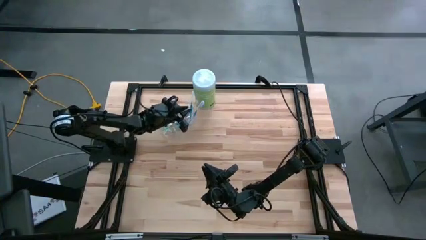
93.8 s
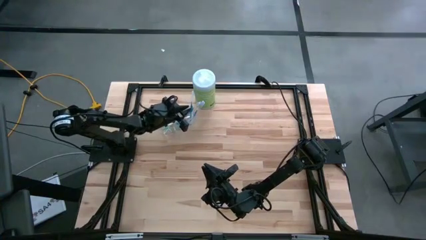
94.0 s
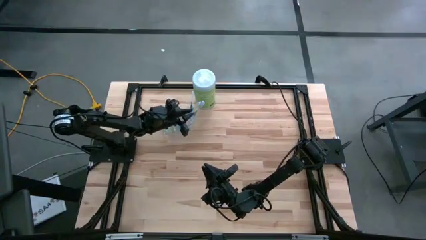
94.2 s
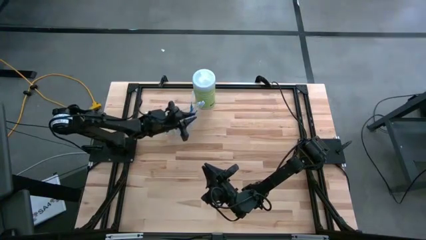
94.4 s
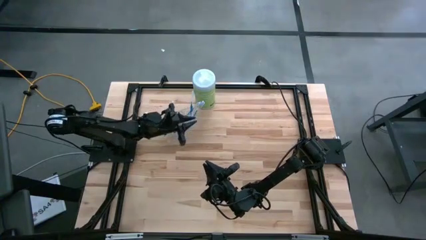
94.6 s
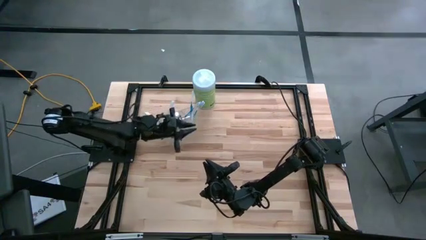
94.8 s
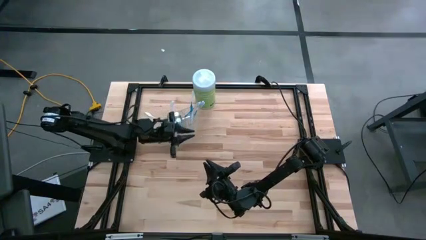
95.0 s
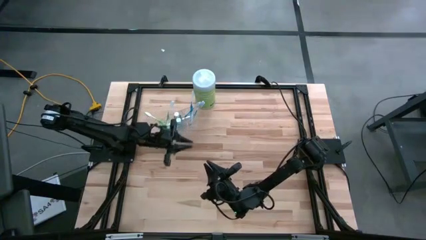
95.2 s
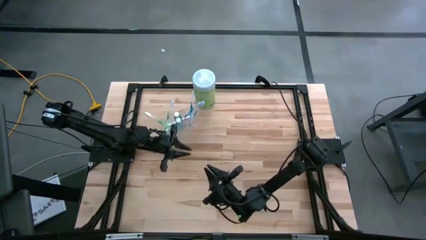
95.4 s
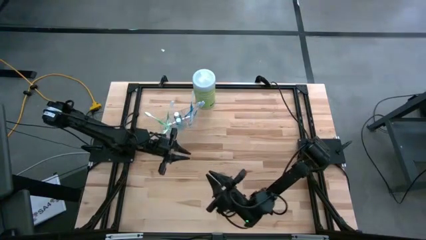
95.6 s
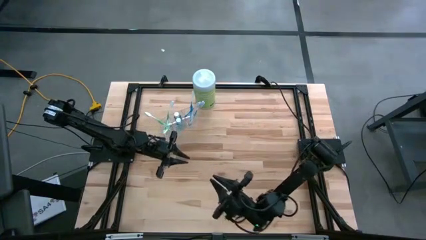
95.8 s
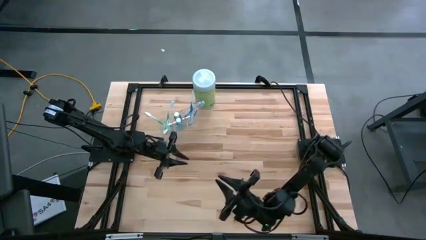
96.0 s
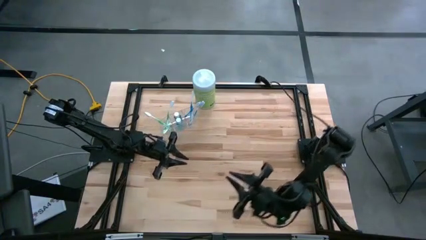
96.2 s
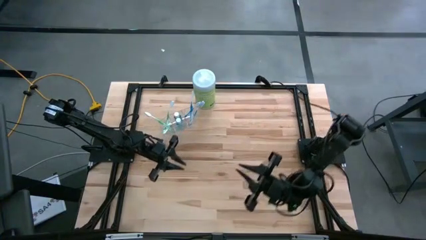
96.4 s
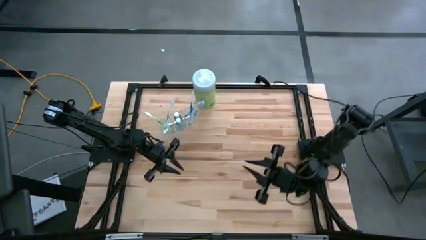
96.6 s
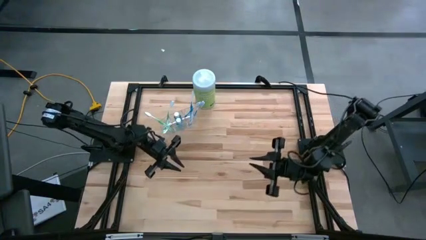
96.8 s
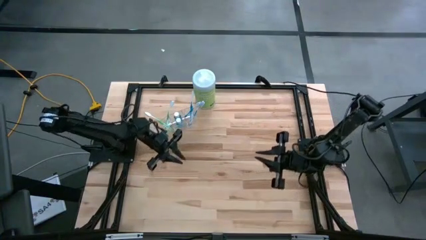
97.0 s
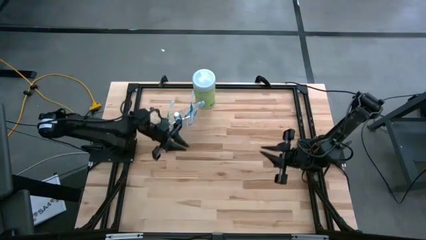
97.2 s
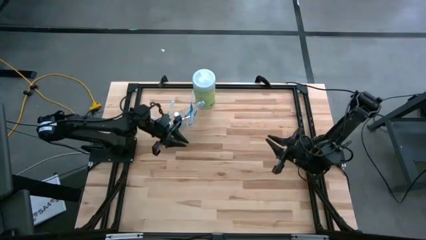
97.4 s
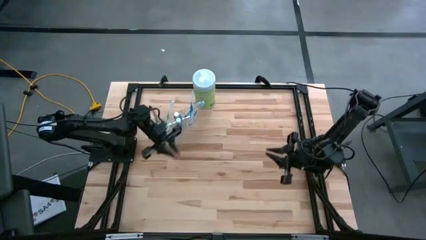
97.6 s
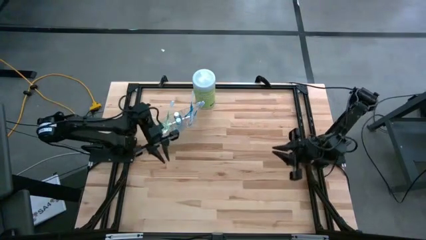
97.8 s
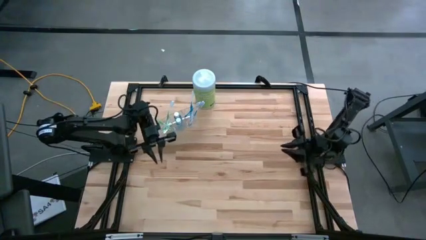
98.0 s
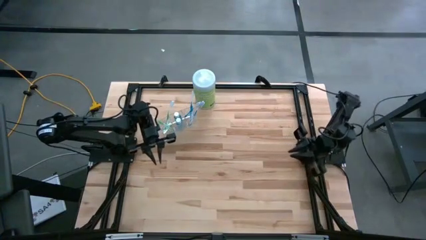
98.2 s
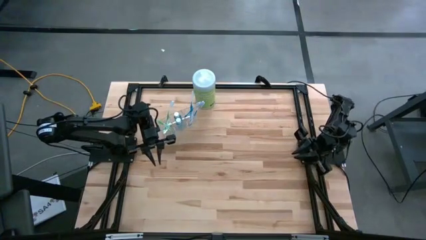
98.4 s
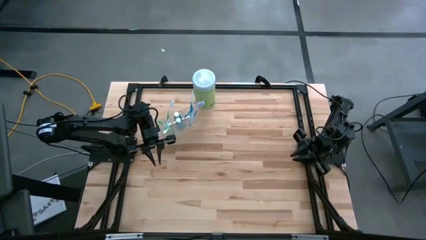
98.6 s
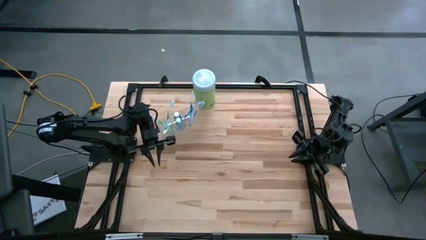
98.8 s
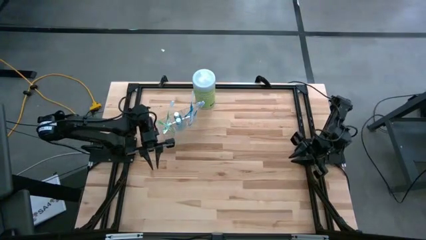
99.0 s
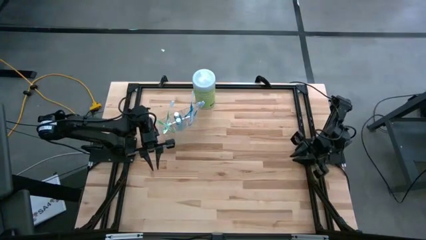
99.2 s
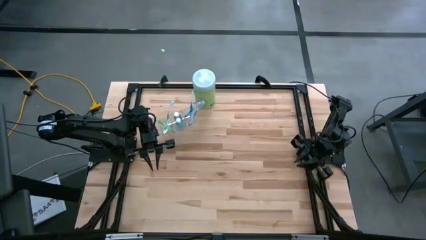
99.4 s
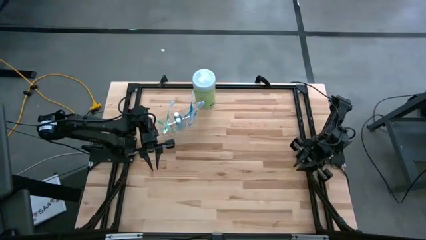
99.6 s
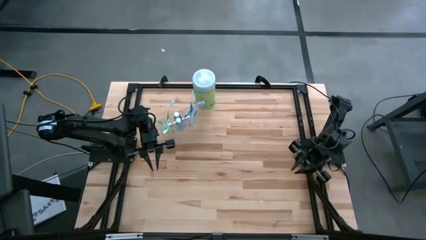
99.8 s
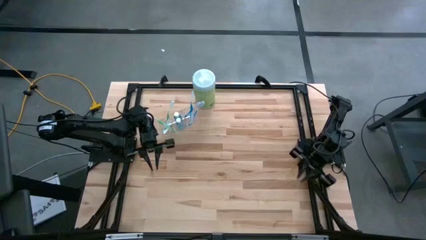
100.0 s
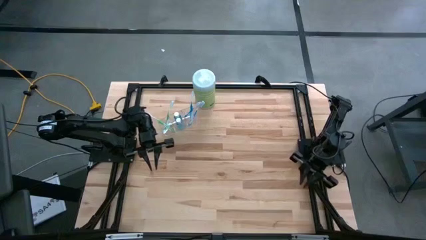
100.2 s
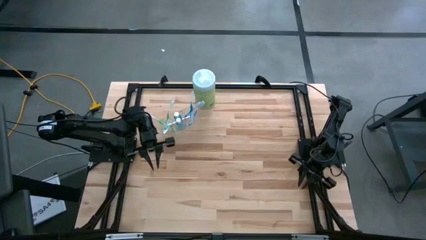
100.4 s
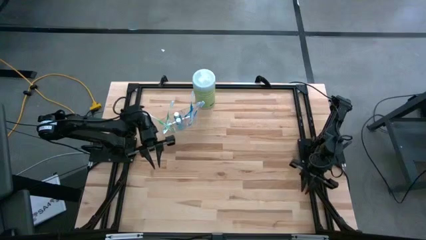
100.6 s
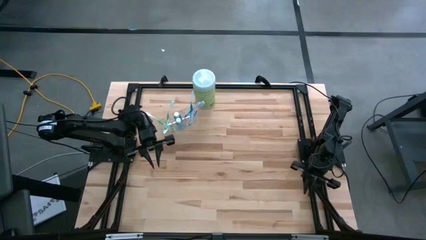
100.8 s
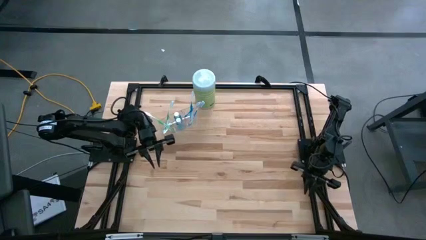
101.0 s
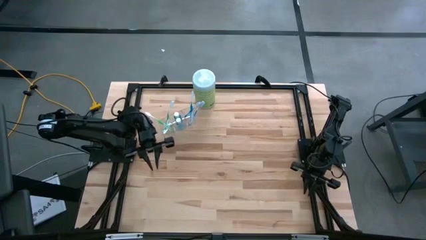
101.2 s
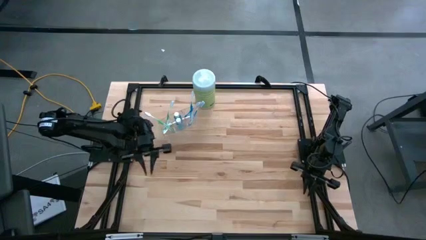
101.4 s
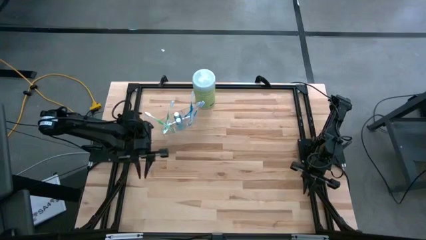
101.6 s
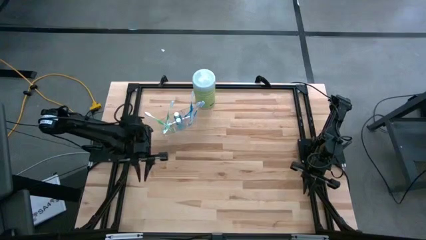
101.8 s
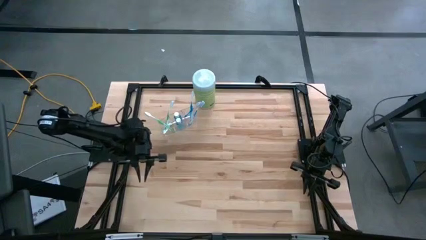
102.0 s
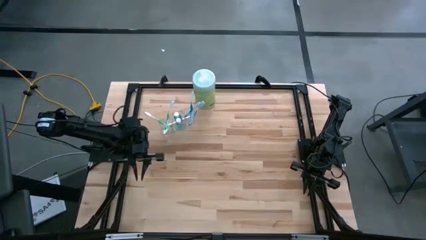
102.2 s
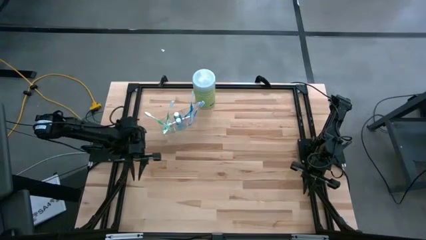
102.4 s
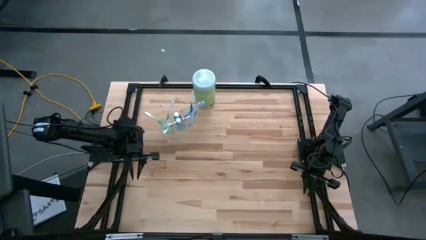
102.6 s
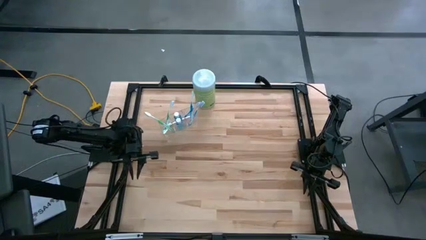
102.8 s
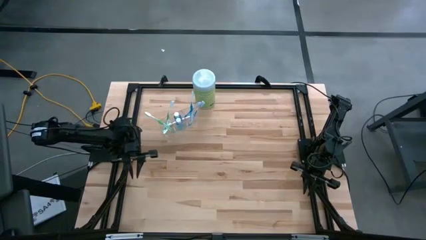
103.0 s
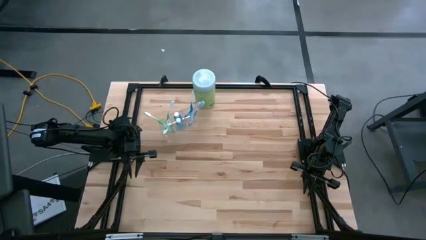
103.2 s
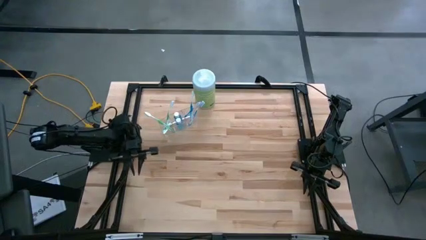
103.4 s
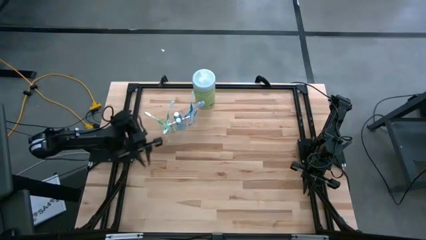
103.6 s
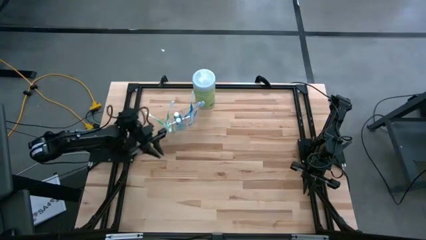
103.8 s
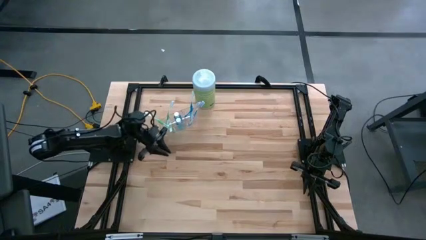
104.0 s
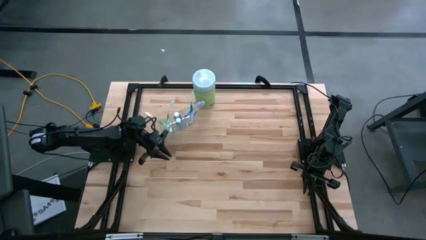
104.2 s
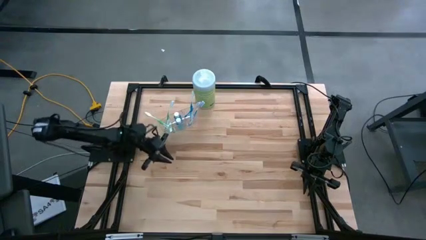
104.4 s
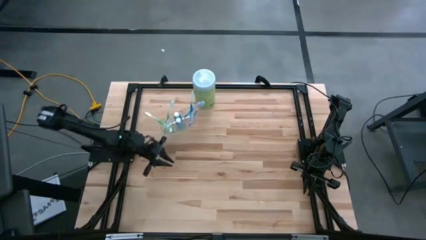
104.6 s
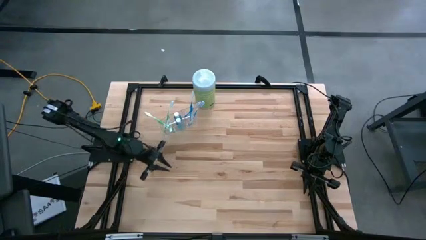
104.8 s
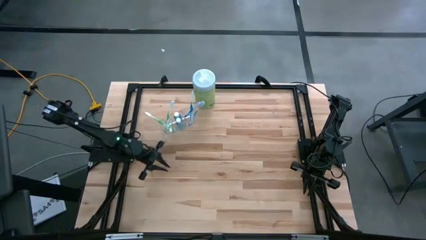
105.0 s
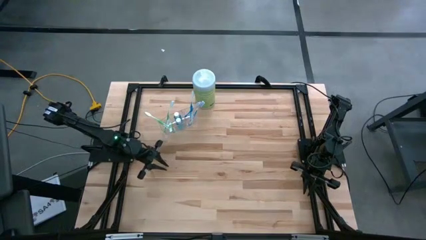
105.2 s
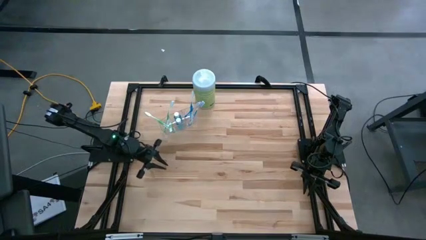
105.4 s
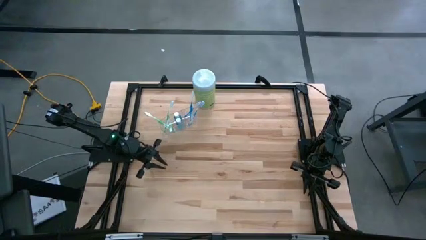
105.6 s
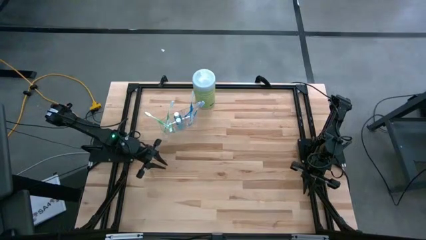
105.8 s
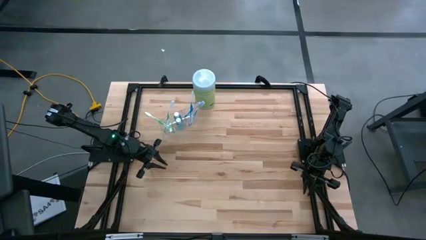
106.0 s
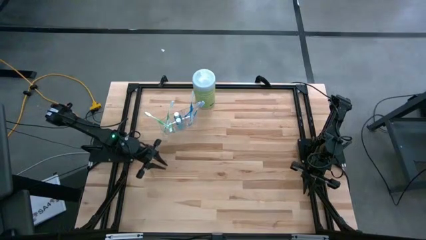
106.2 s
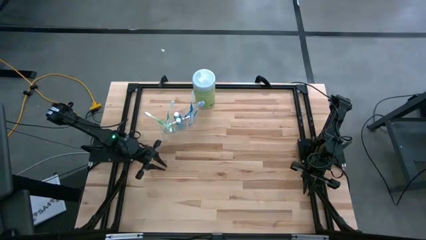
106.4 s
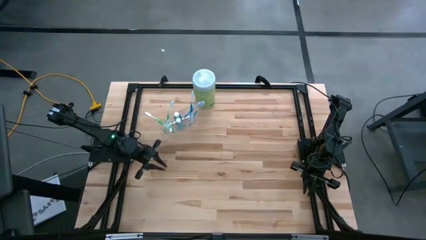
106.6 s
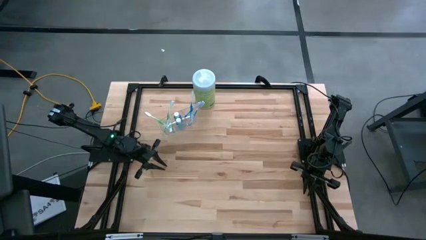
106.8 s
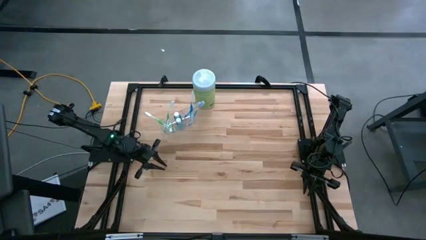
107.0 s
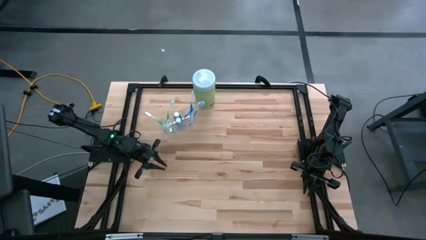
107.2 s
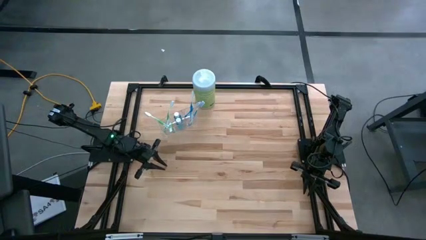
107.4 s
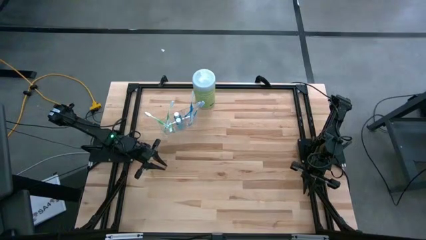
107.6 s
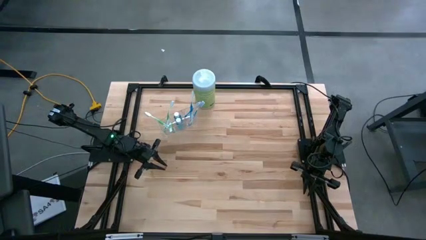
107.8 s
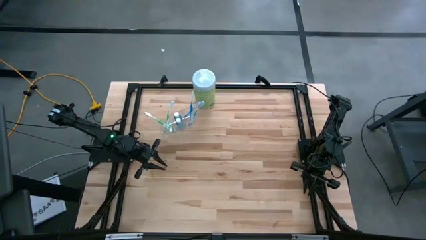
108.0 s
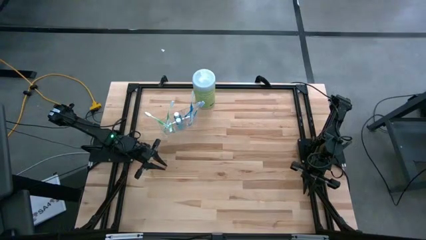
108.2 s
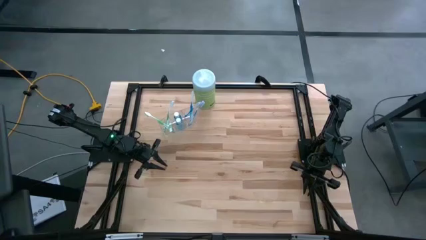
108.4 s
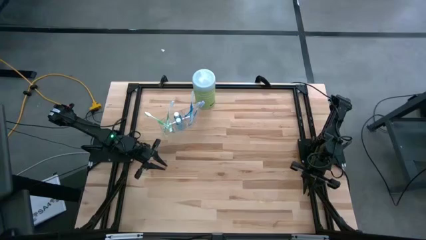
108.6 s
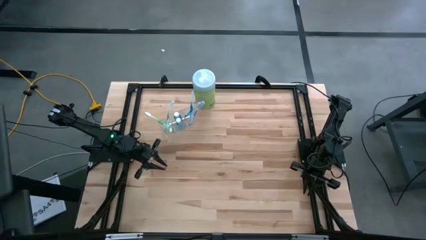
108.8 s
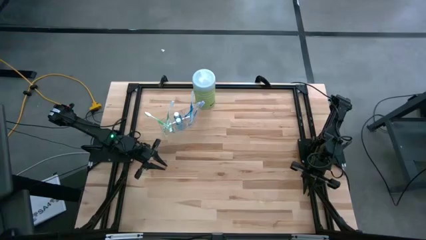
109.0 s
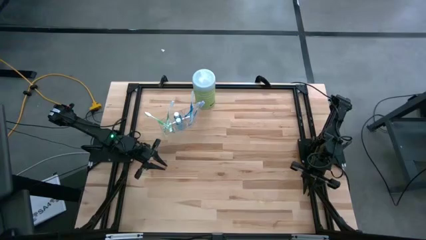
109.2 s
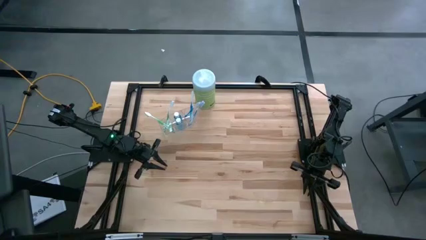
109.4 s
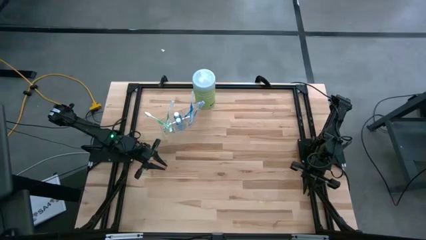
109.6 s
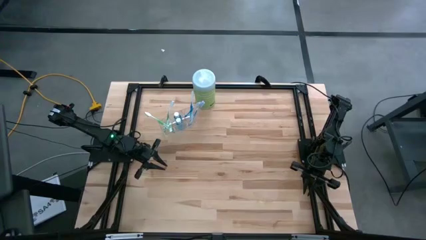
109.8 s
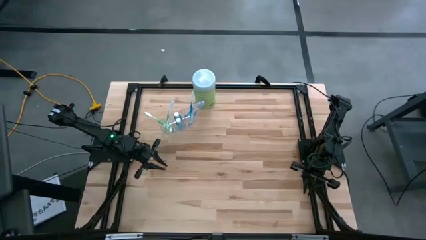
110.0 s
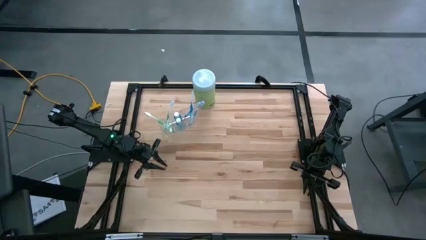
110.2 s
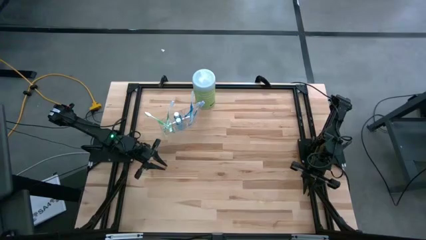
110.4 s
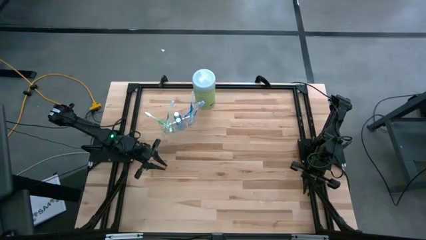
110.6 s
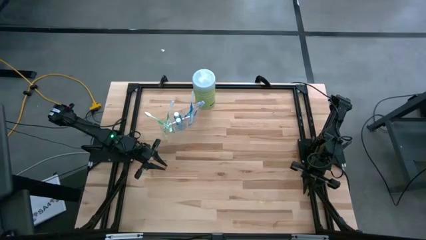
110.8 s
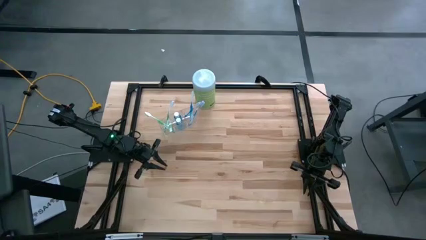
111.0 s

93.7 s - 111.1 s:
Task: Pick & Place toothbrushing station
Return to Home Position
